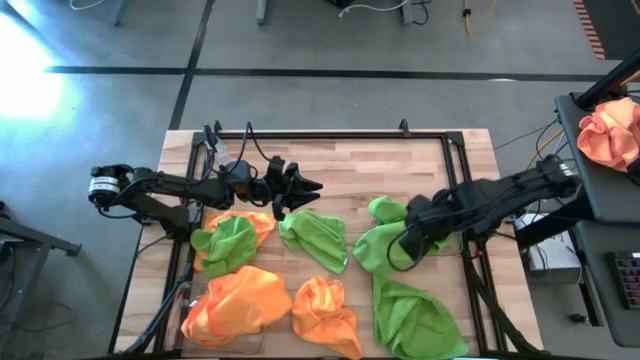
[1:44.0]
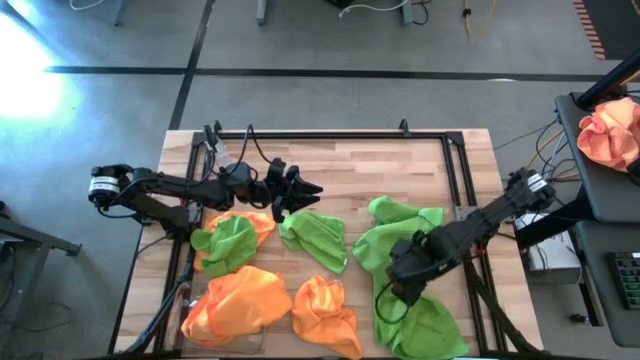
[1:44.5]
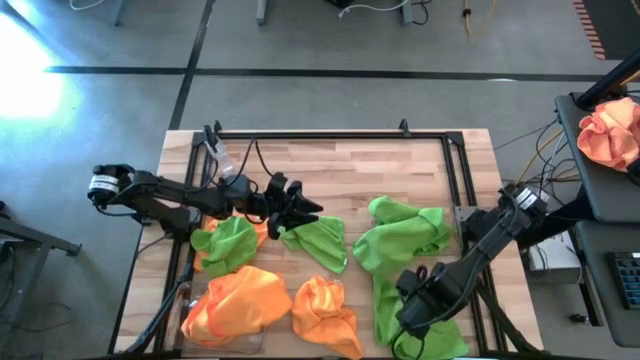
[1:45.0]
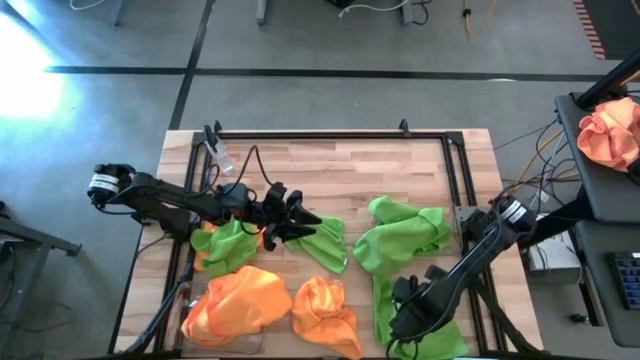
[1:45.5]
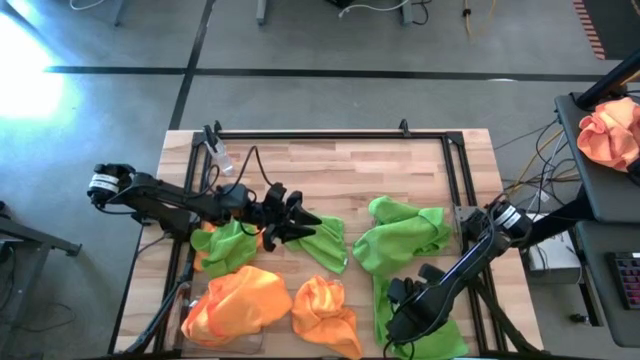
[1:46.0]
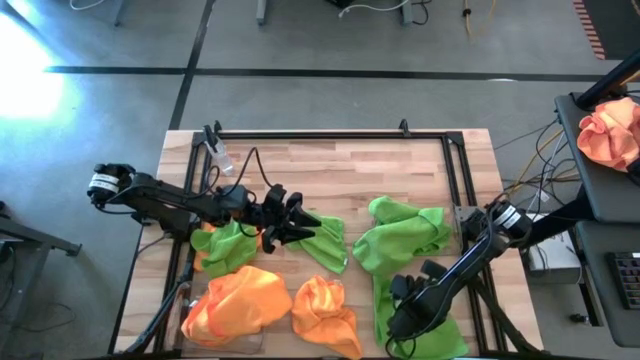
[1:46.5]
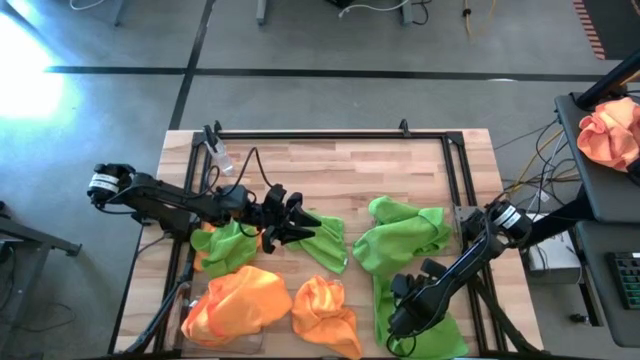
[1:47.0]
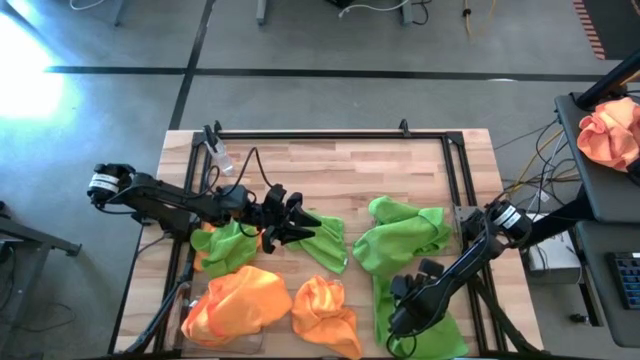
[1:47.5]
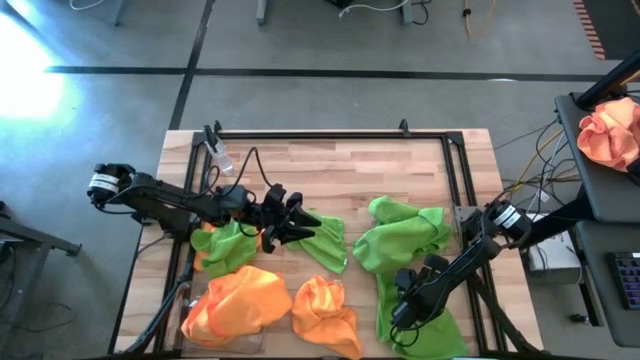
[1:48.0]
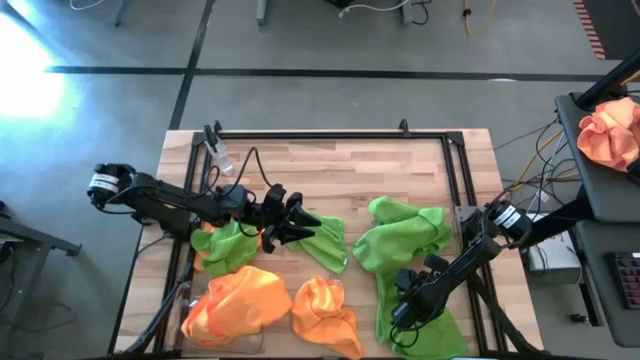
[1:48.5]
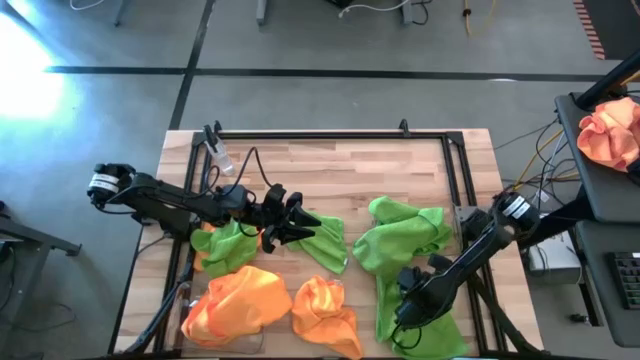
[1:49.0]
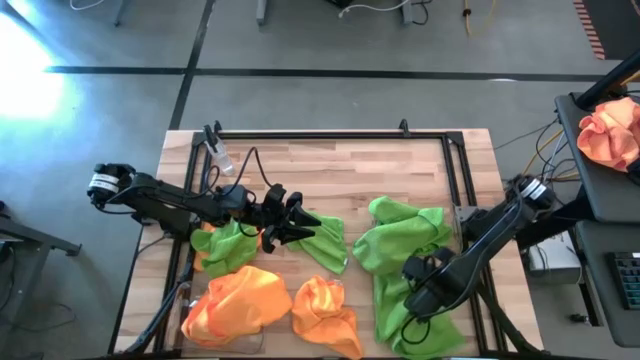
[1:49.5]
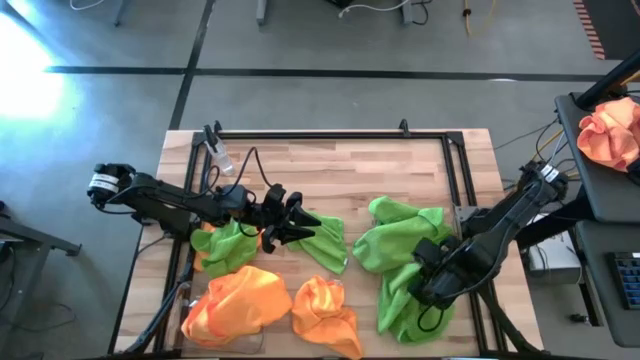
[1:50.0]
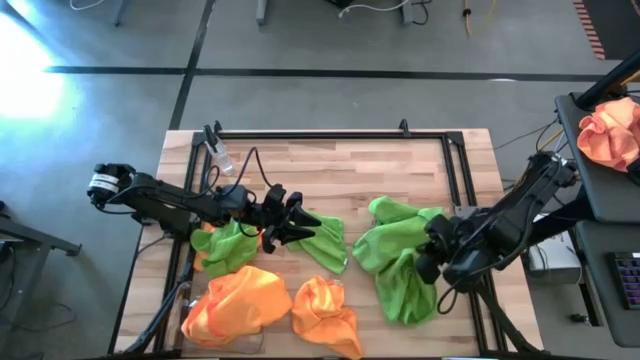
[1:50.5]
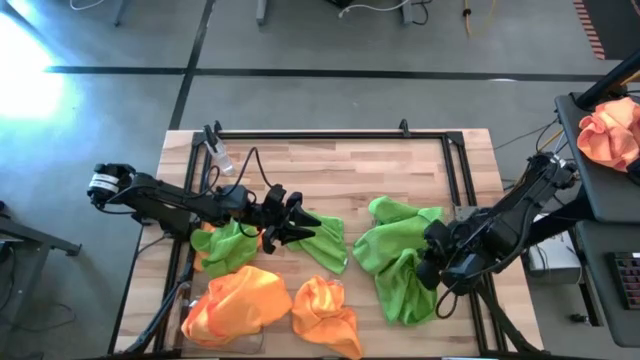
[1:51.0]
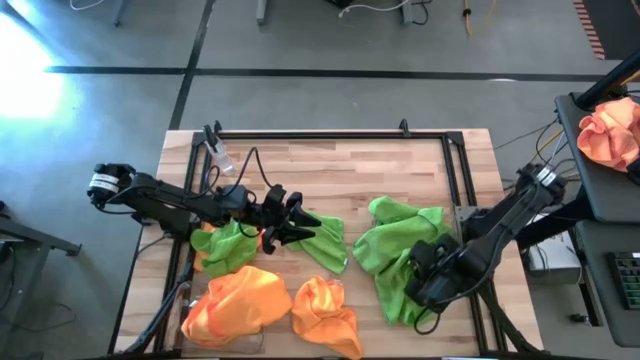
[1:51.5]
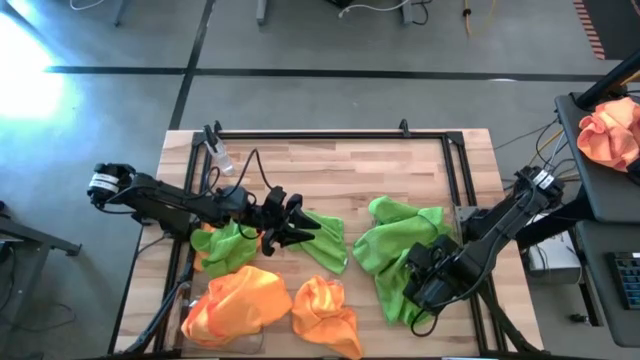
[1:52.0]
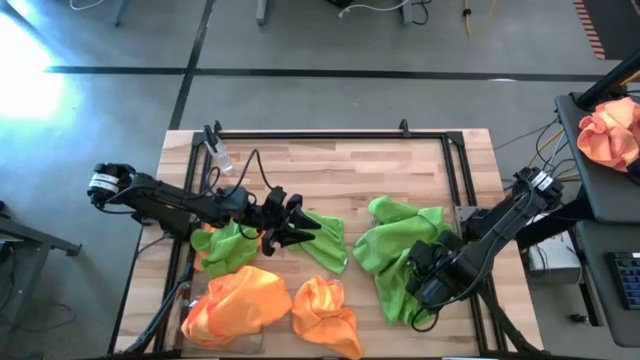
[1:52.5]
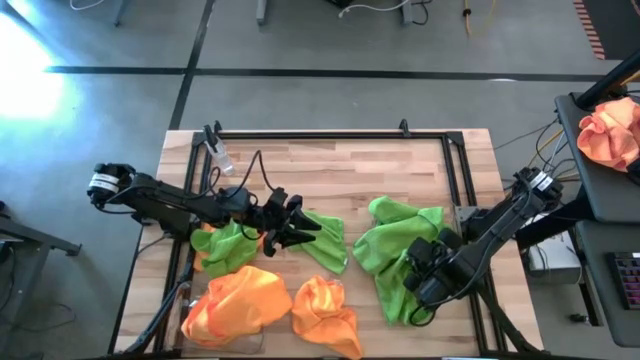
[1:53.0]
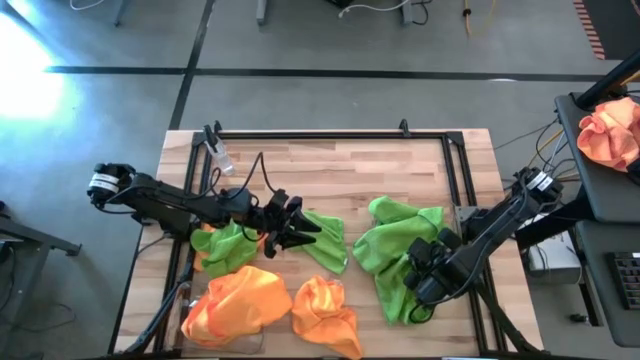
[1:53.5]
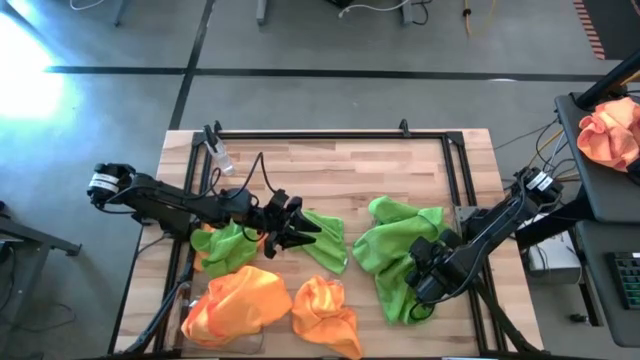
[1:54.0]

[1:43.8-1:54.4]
Task: Sort microfiber towel by color & place in baskets
Put the bottom right green towel into the right transparent bin

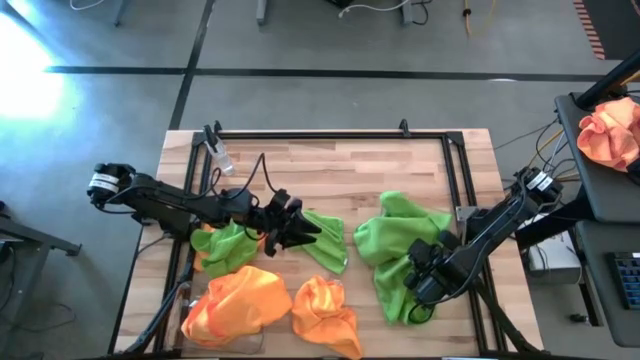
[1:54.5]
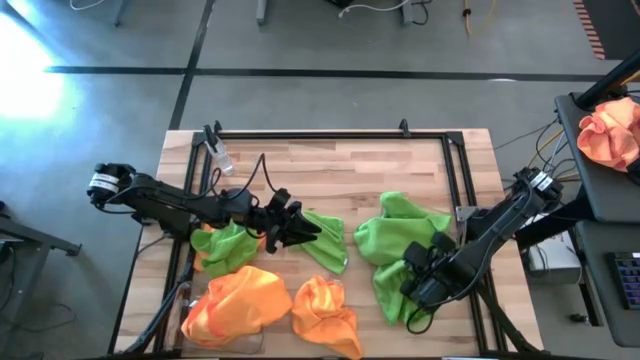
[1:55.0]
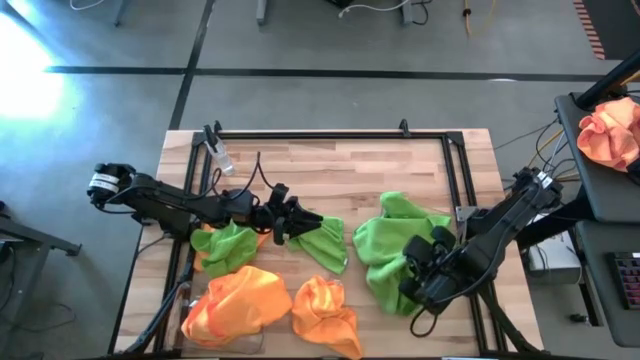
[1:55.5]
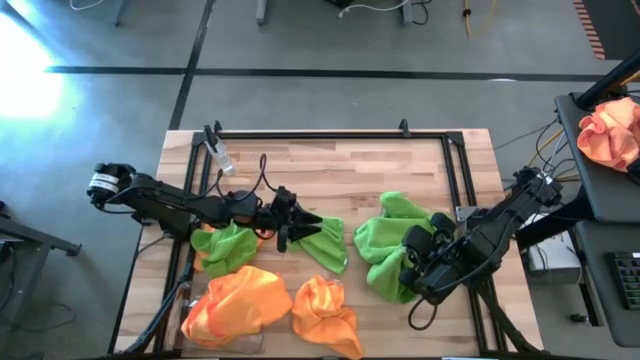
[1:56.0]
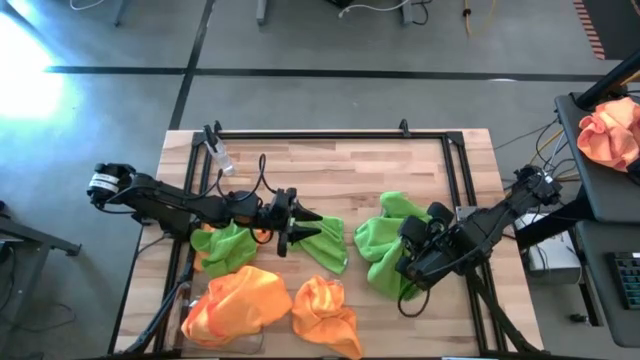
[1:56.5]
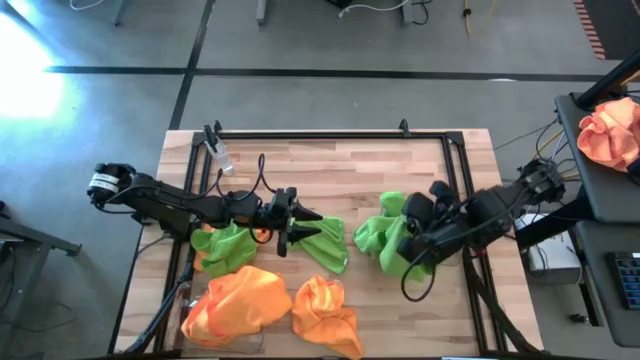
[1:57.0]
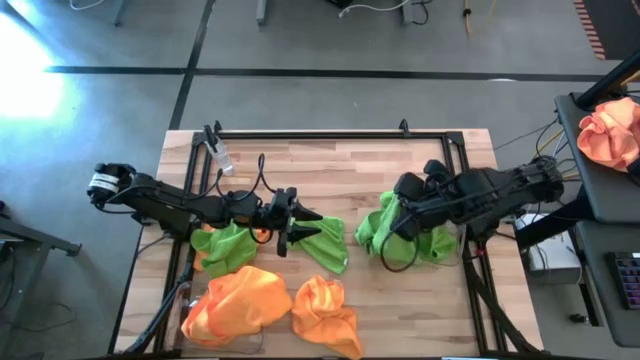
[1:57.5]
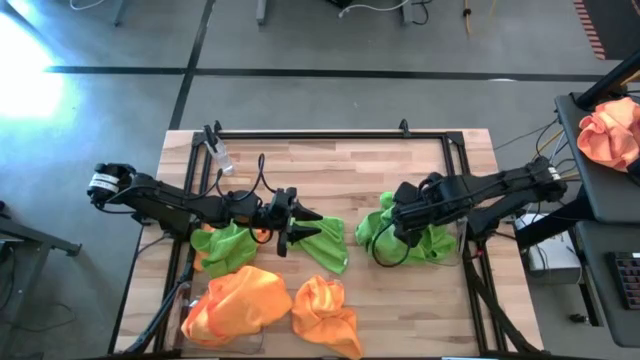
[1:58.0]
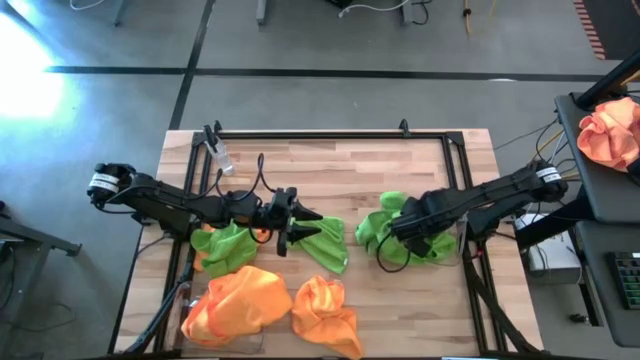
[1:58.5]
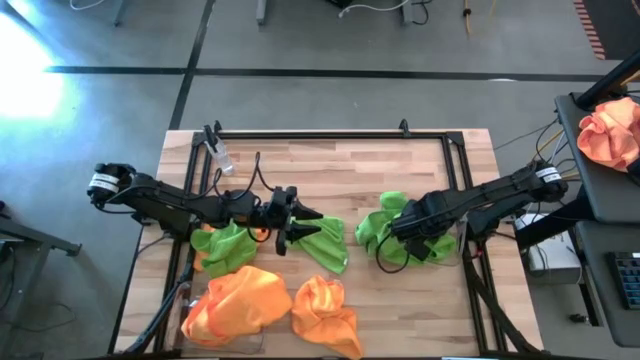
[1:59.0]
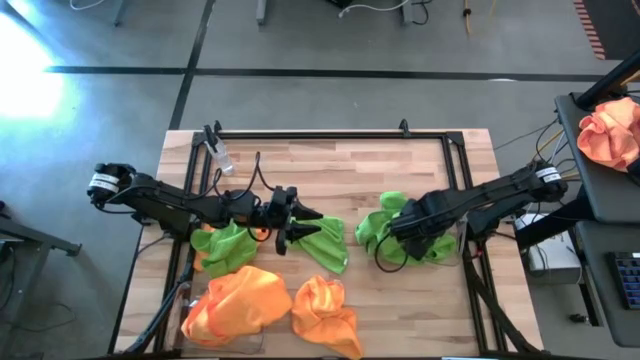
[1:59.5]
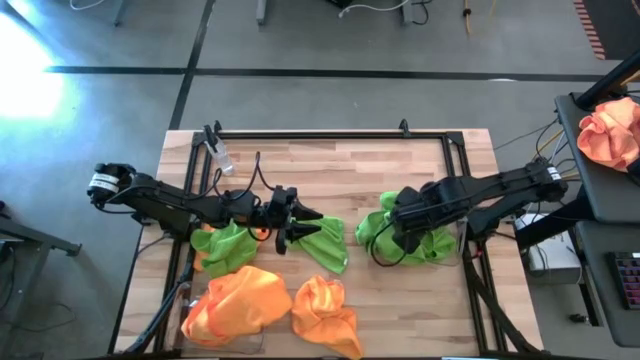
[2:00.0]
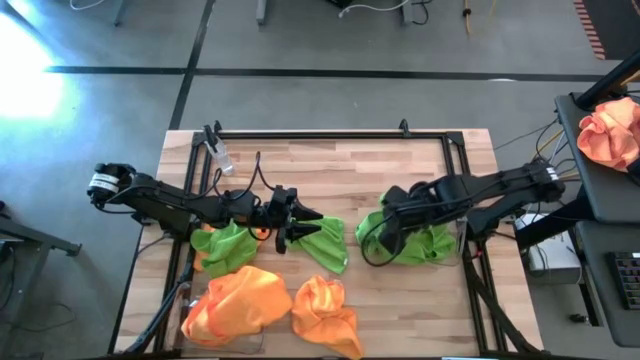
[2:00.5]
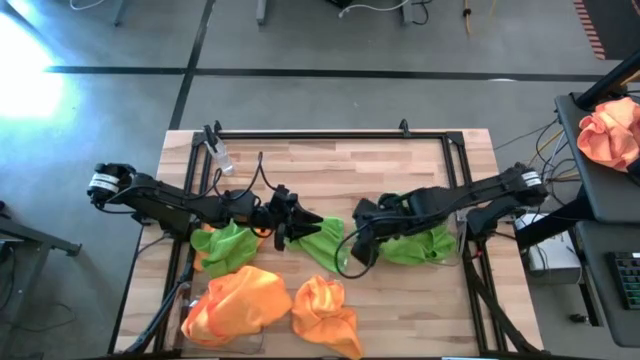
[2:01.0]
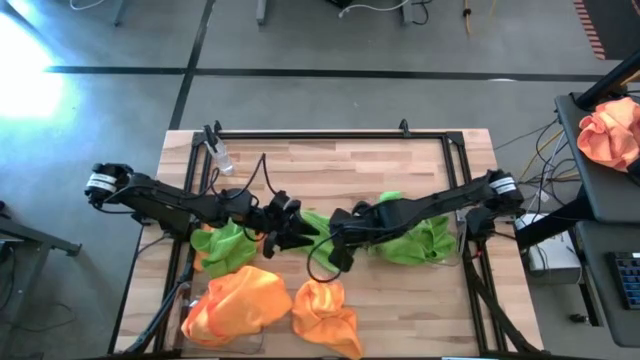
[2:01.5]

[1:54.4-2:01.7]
Put the bottom right green towel into the right transparent bin

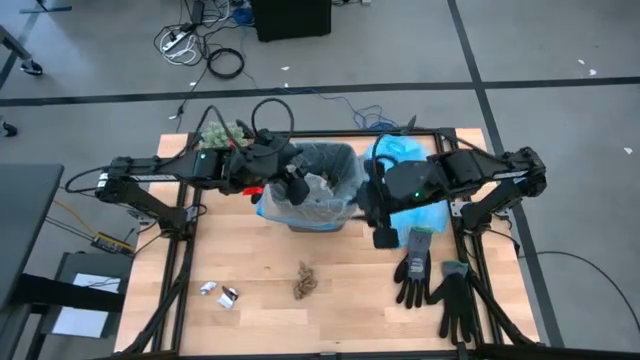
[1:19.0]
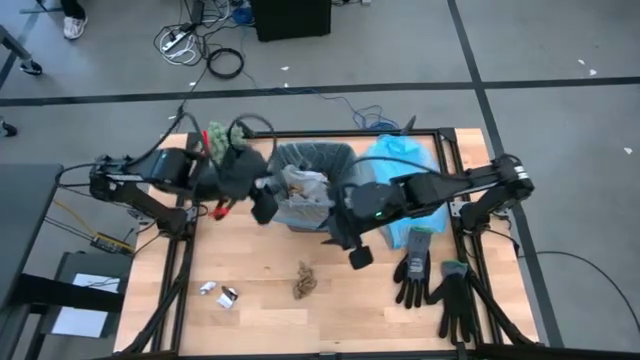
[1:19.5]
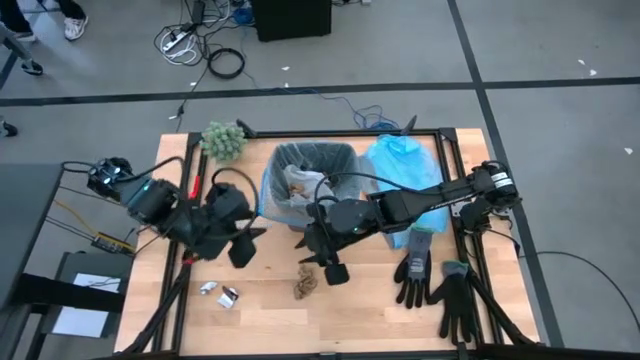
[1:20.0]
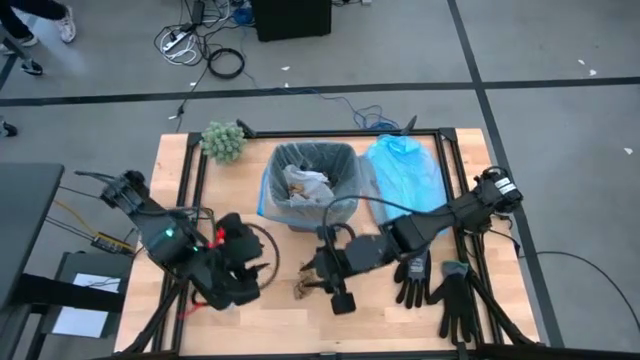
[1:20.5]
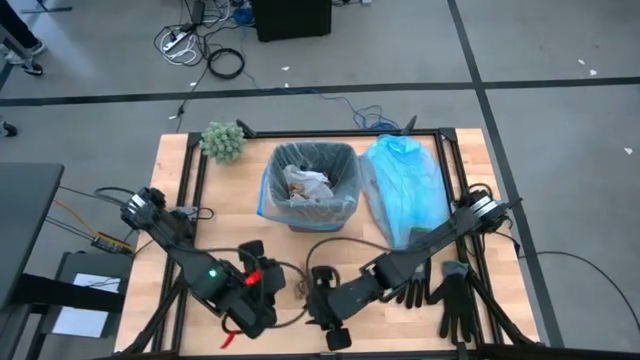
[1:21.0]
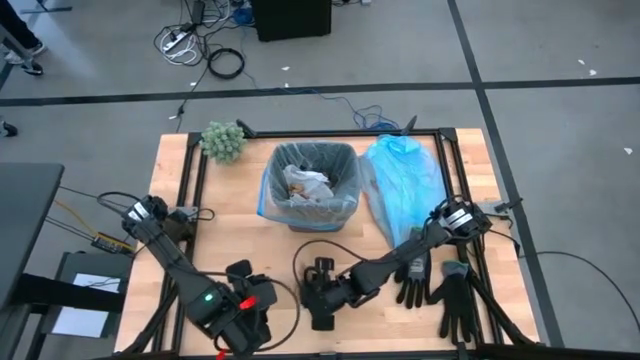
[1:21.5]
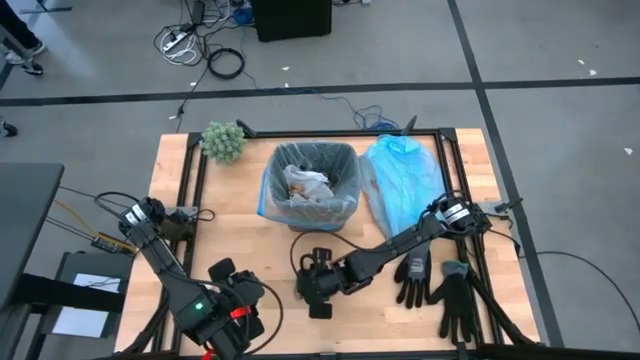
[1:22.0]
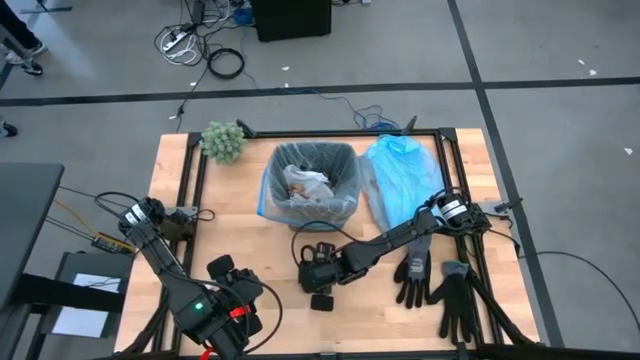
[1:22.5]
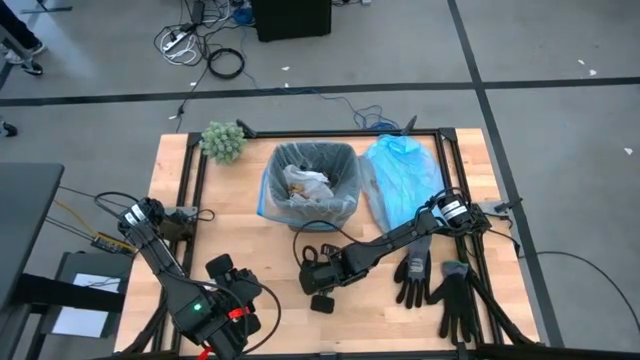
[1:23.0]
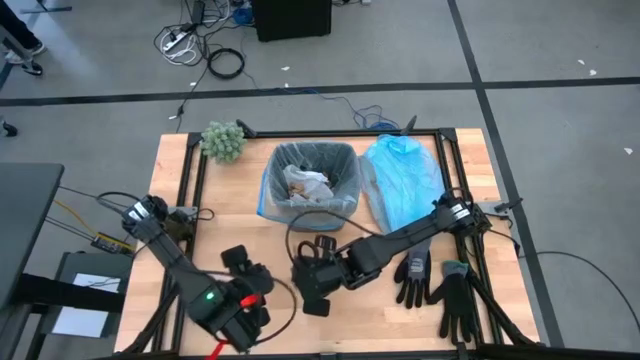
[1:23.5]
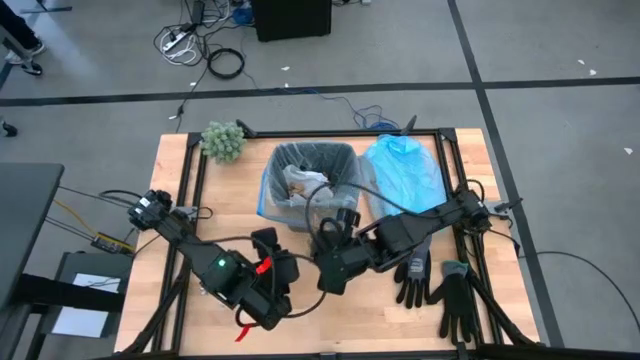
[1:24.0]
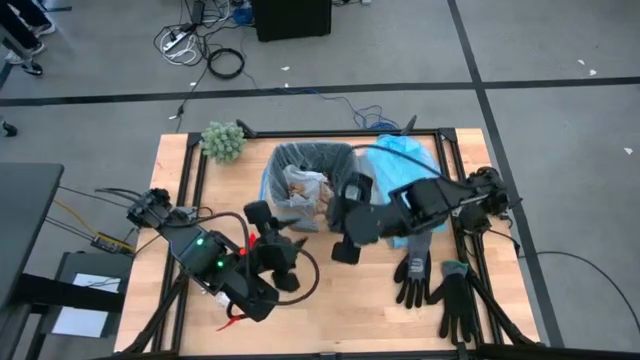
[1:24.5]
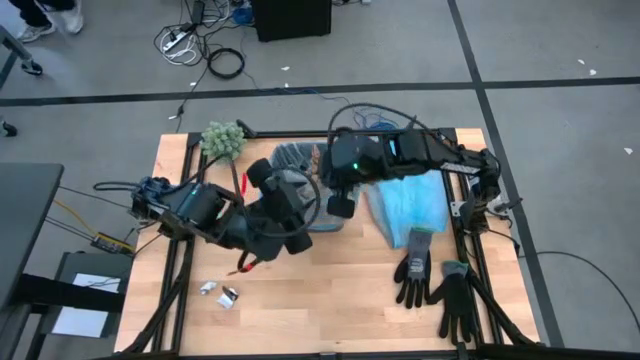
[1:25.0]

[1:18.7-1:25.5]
Task: place trash/remove bag and relplace
Put the brown napkin into the trash bin
